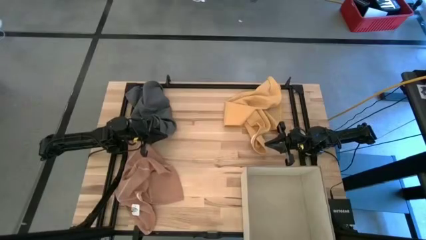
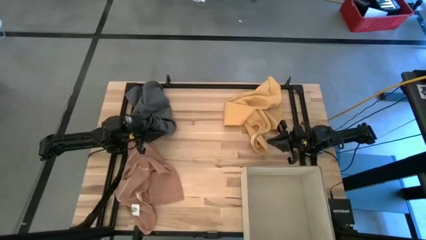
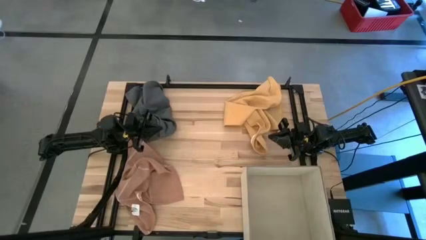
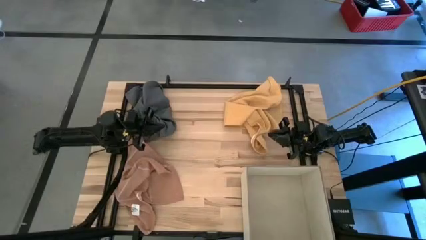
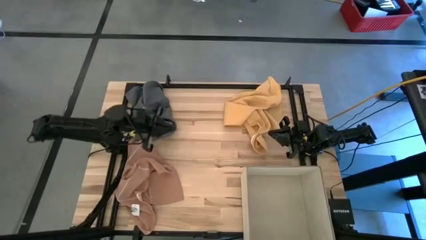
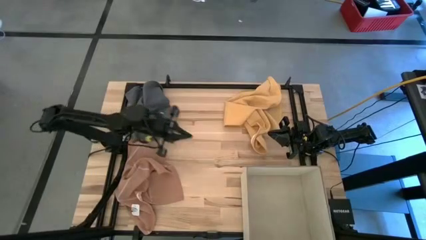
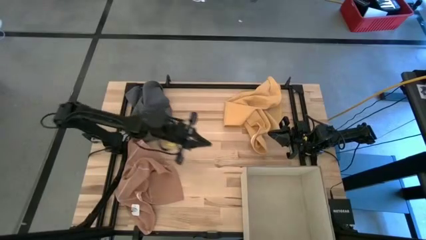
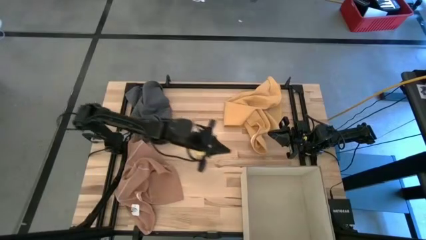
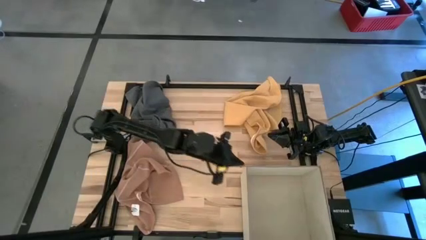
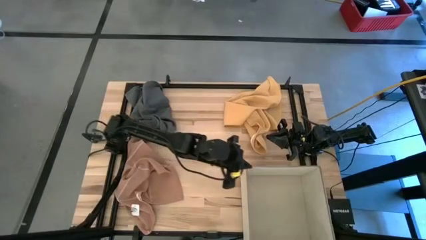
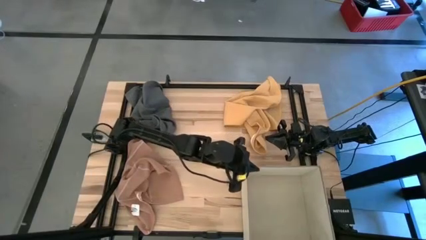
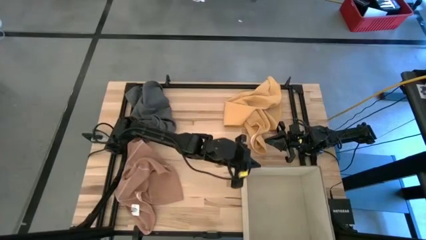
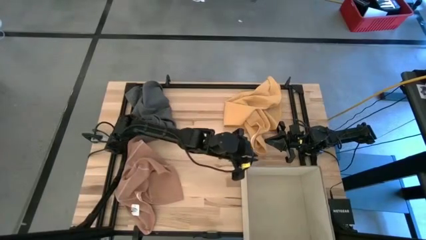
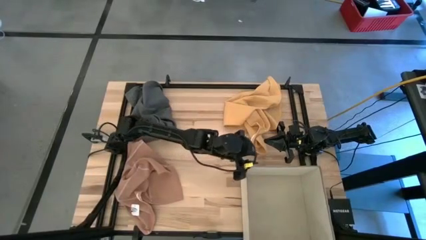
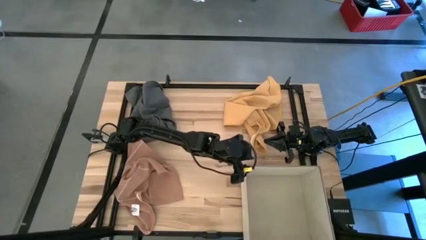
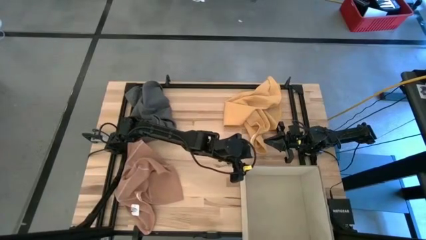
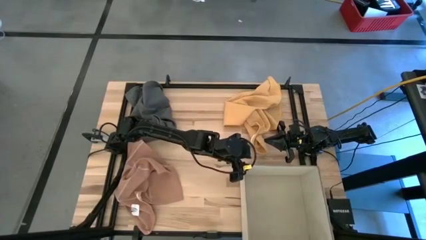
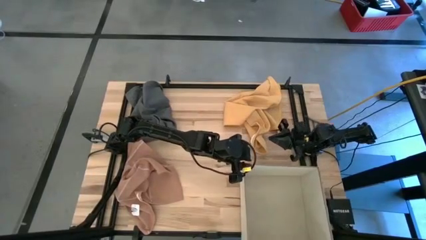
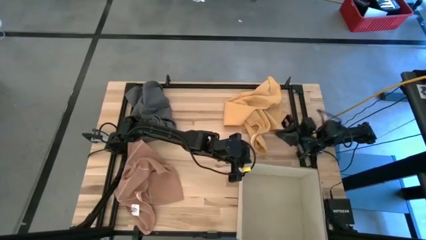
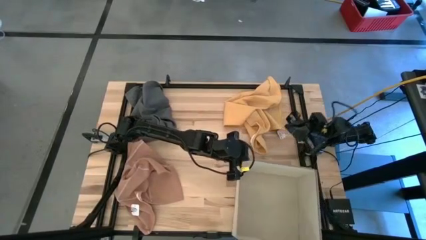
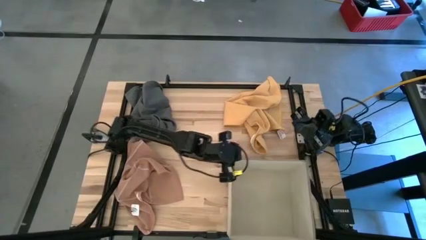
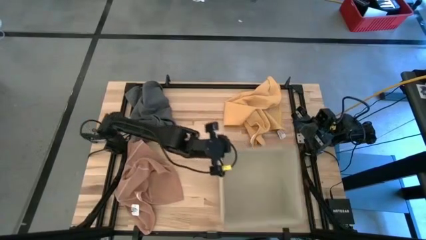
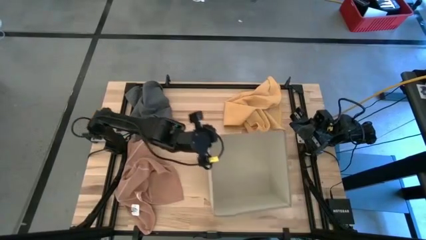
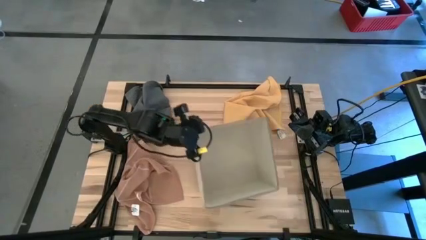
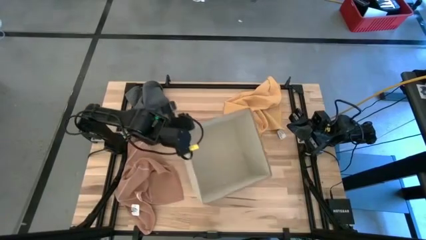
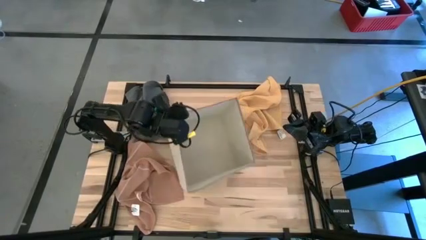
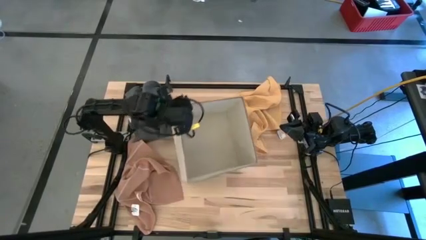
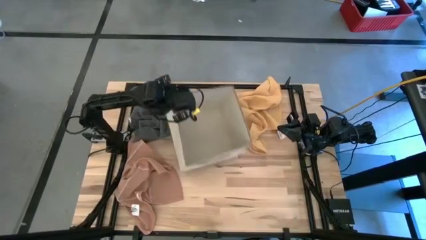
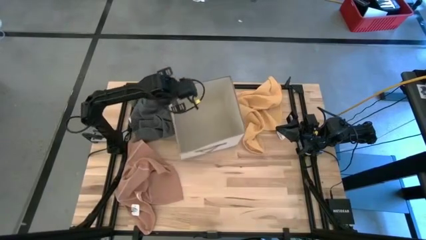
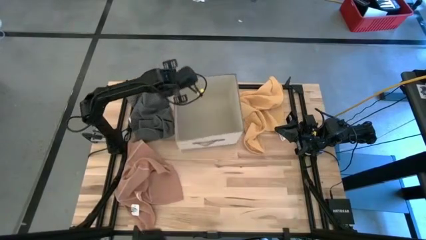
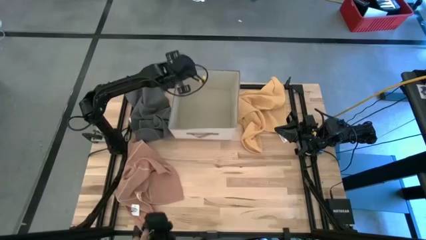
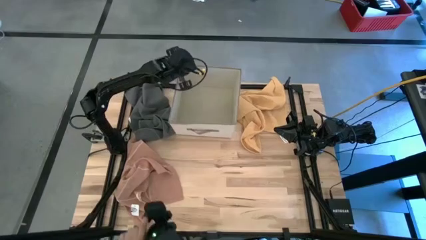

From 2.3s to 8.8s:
Task: Fold towel
Move the brown laundry organizer to the top center of the table

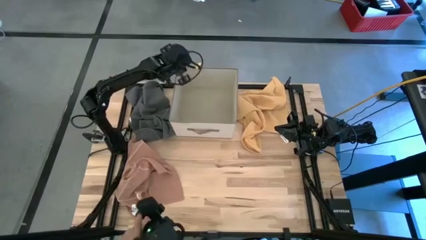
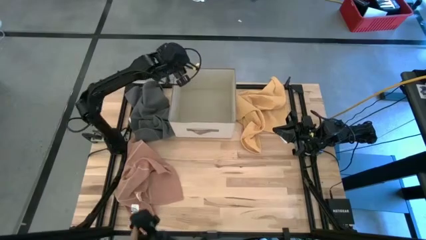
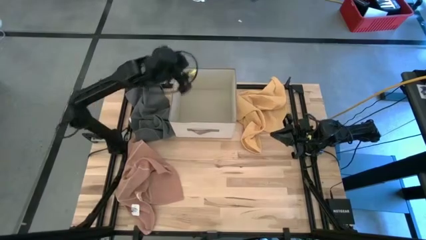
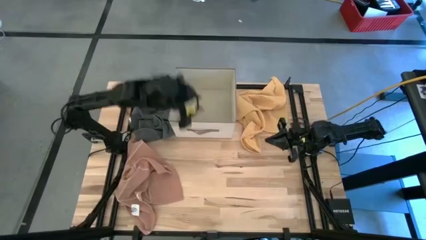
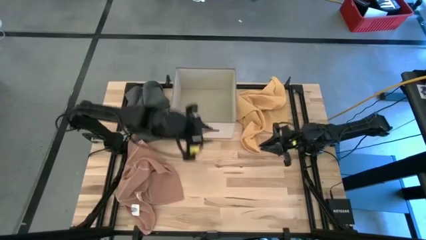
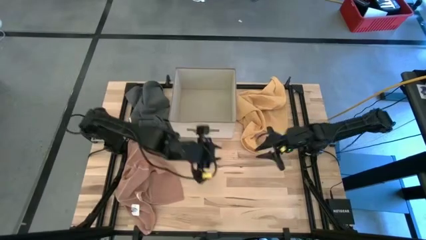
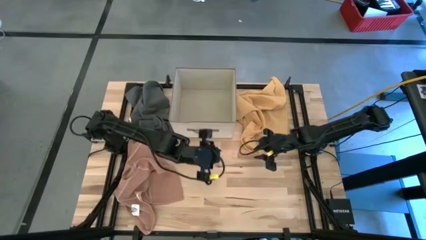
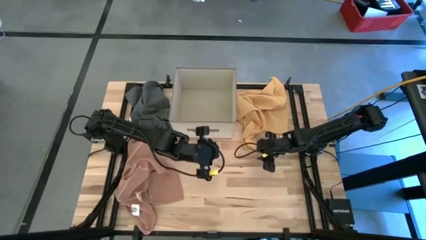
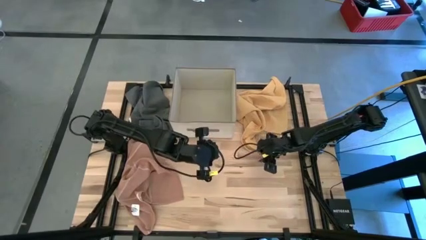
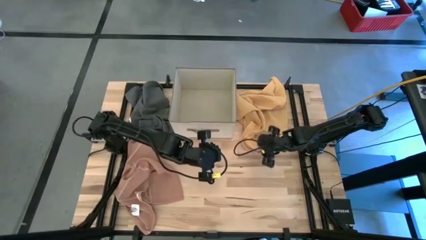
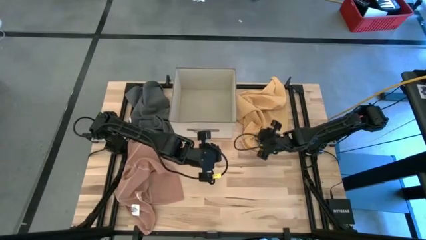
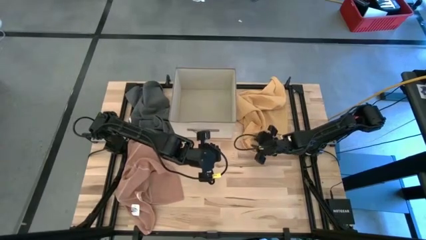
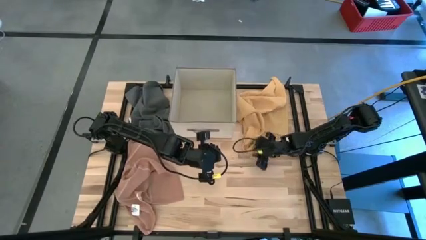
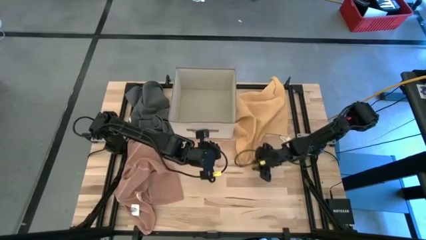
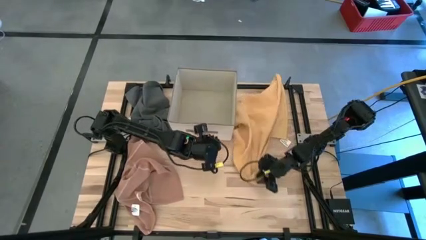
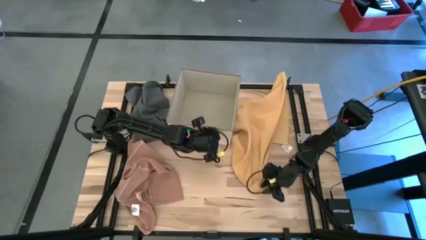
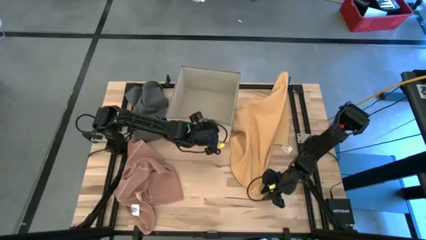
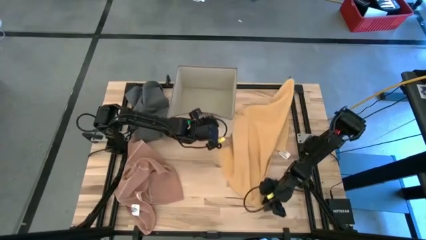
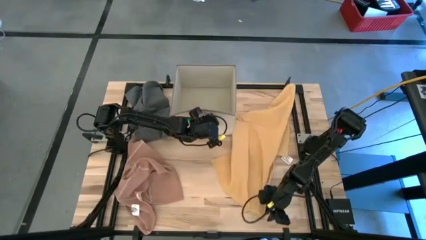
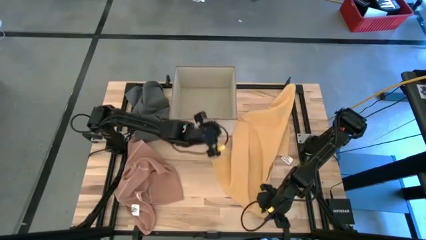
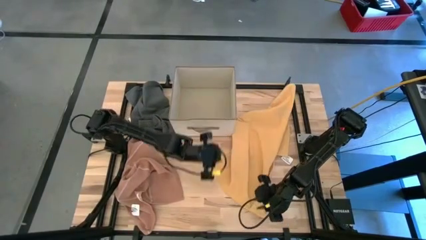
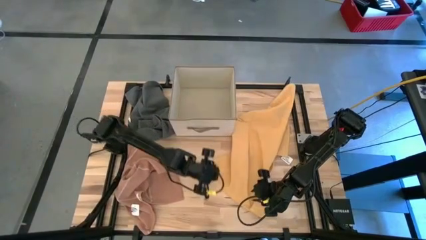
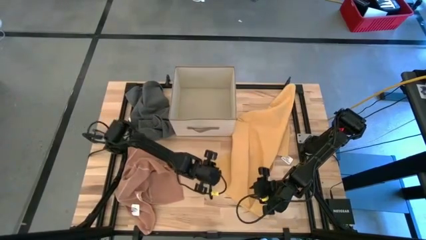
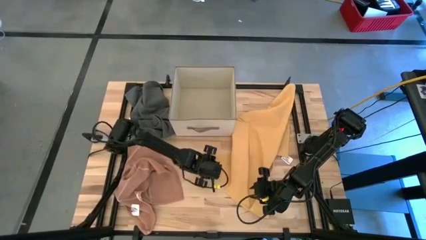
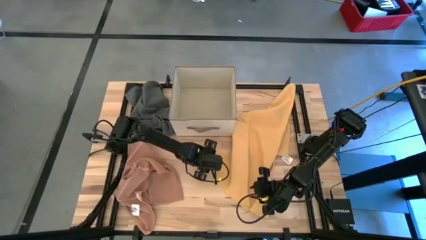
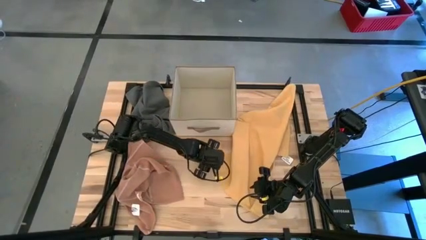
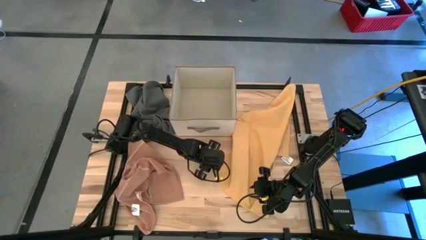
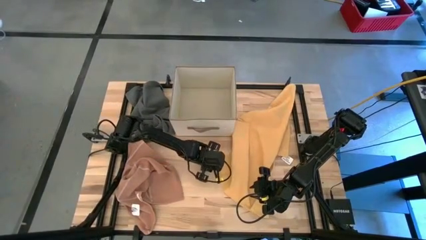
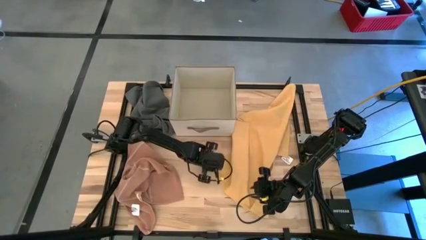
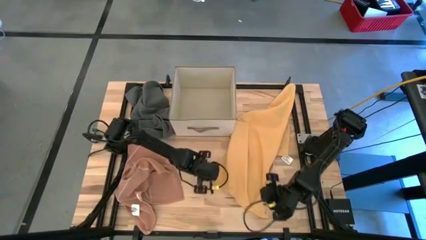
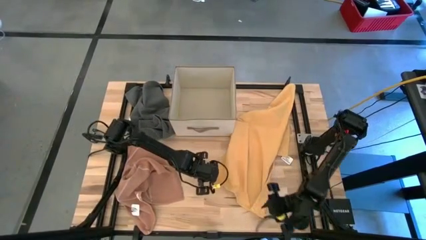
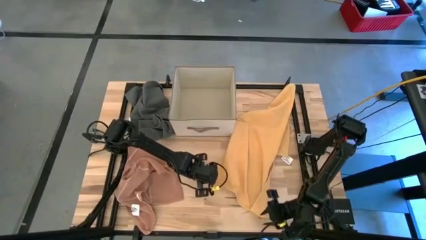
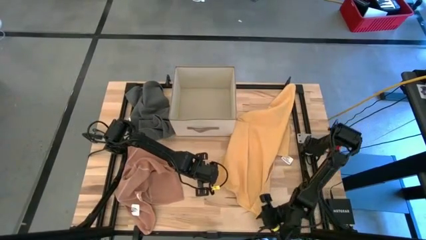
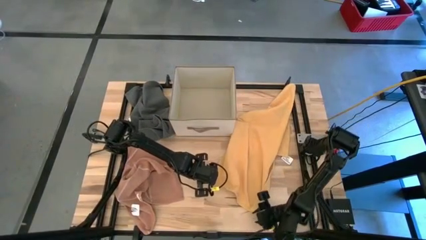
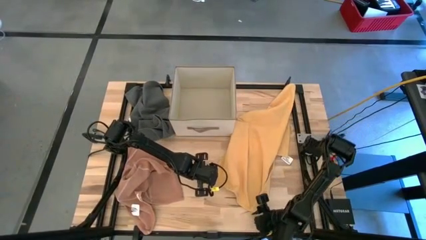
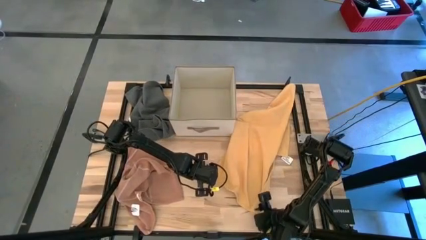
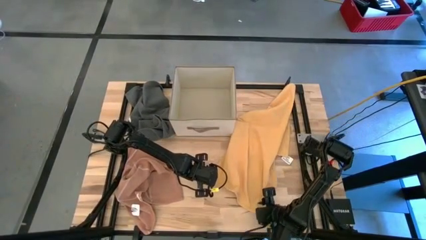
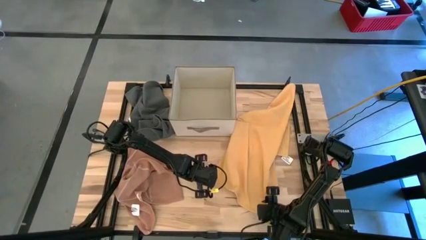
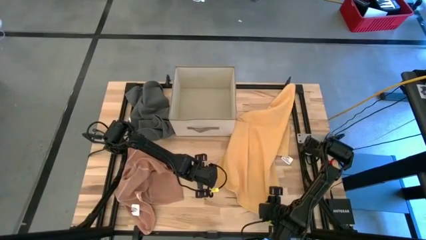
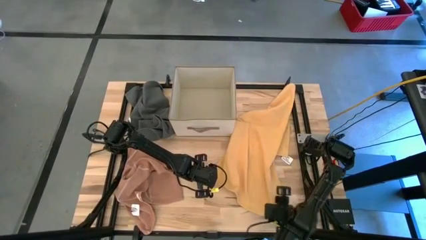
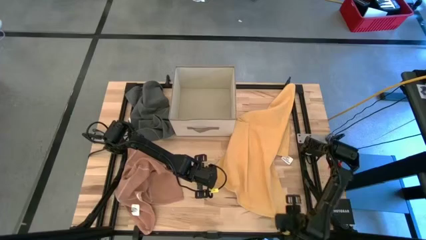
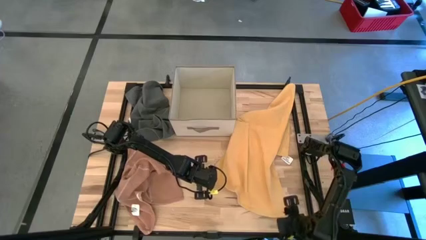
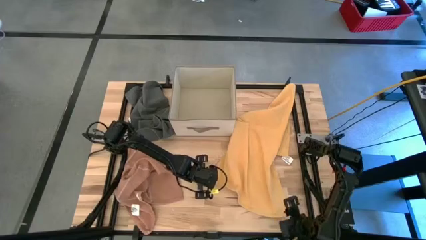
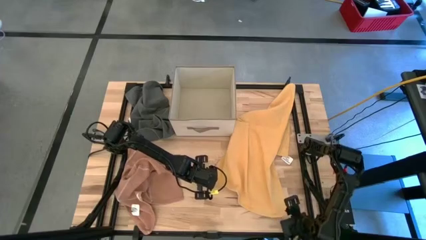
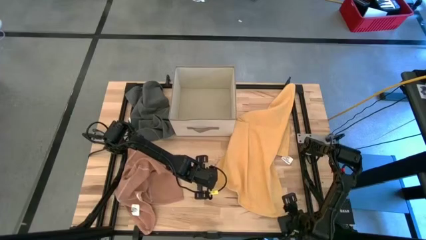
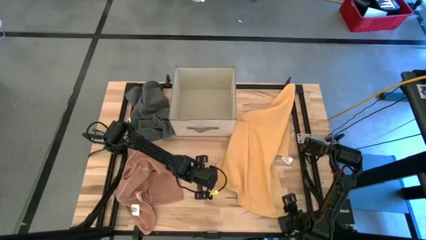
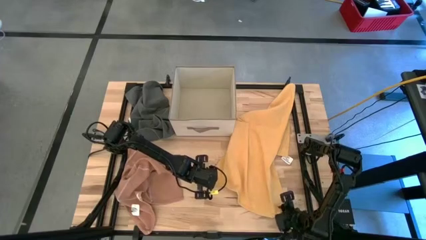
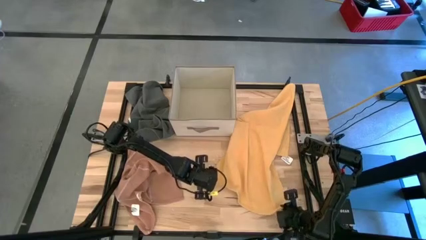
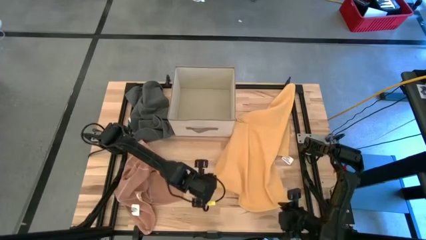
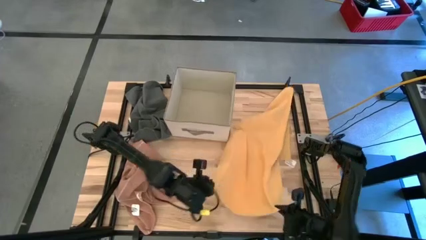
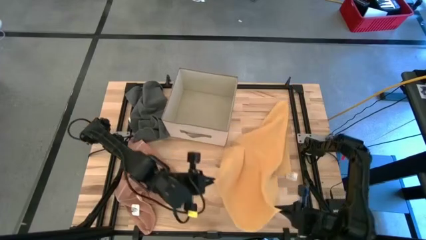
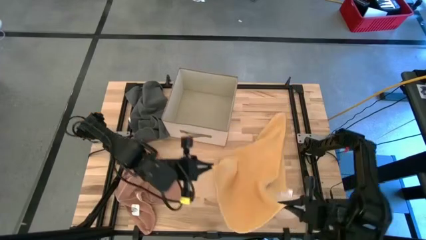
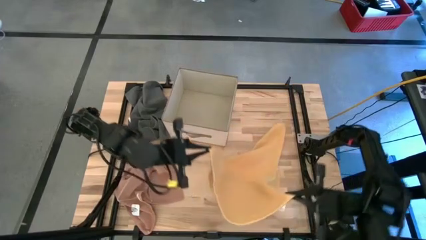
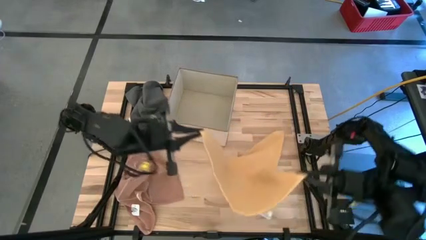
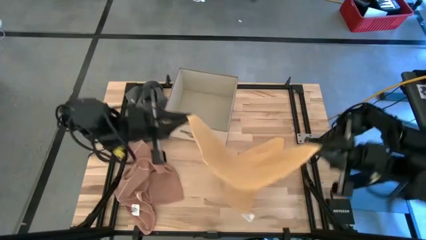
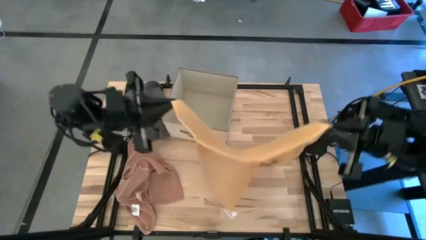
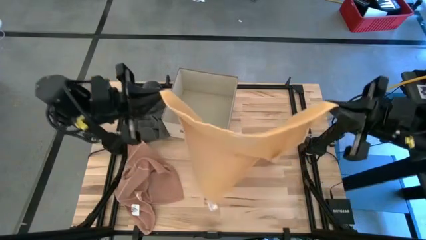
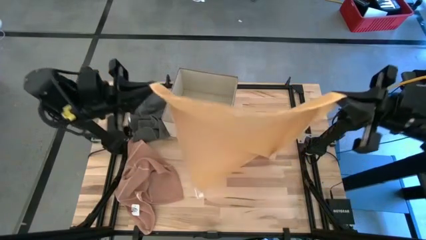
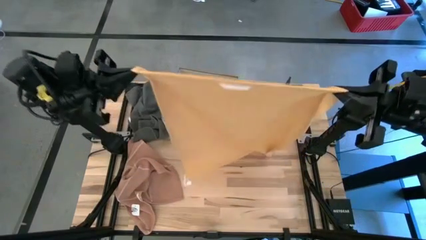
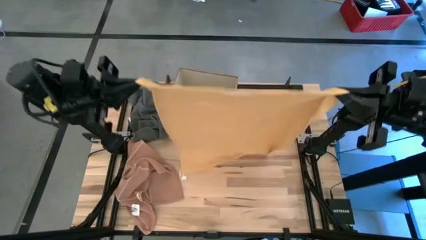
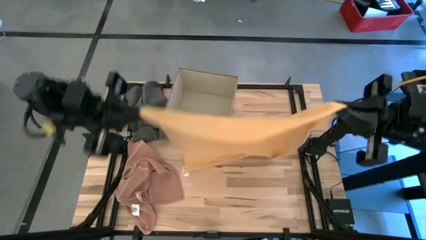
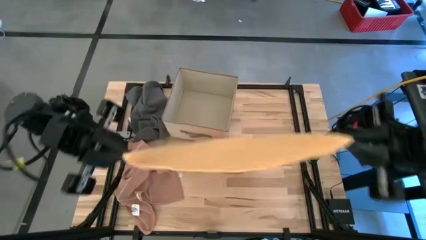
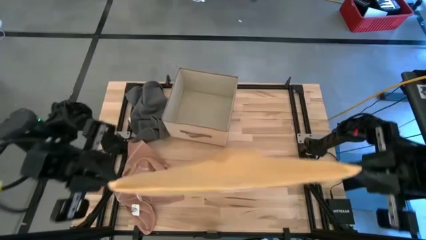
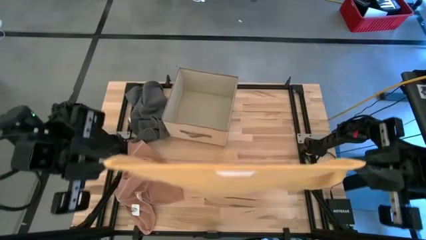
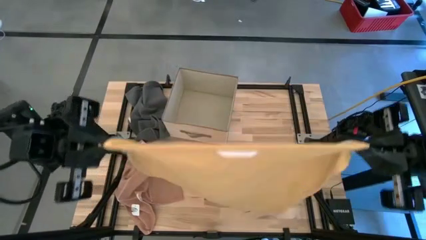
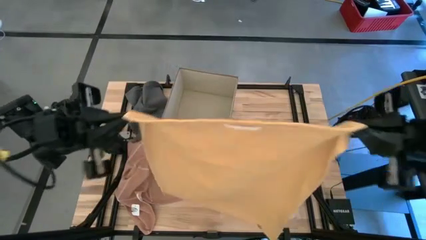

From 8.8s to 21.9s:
Fold the yellow towel
